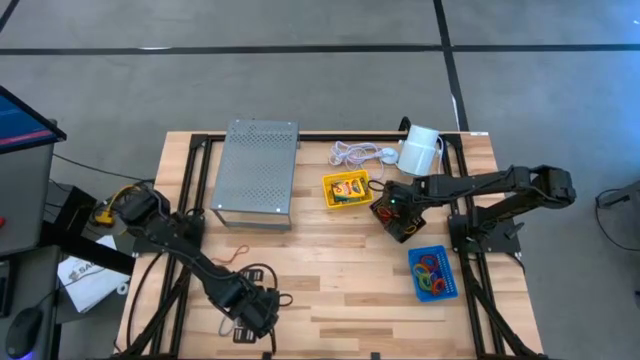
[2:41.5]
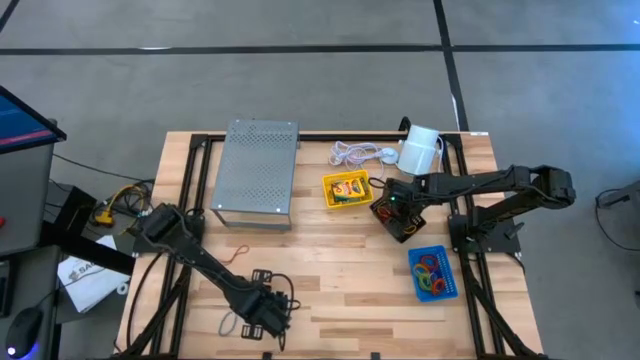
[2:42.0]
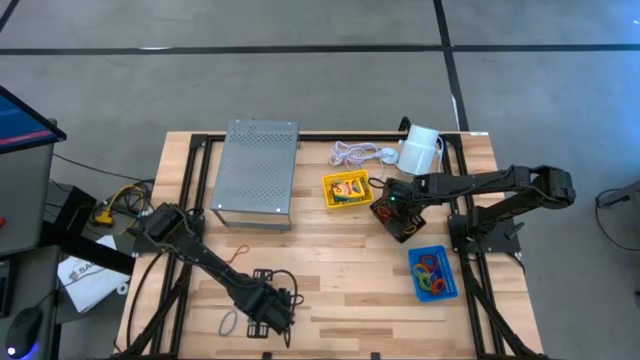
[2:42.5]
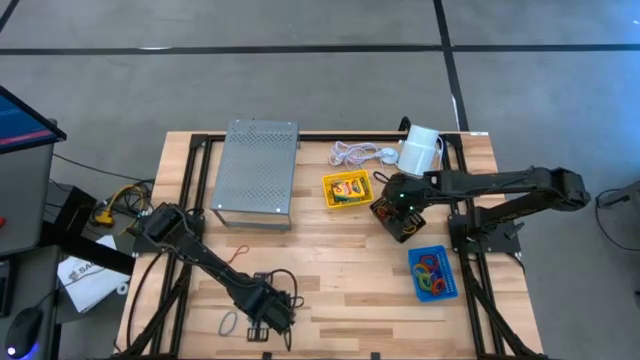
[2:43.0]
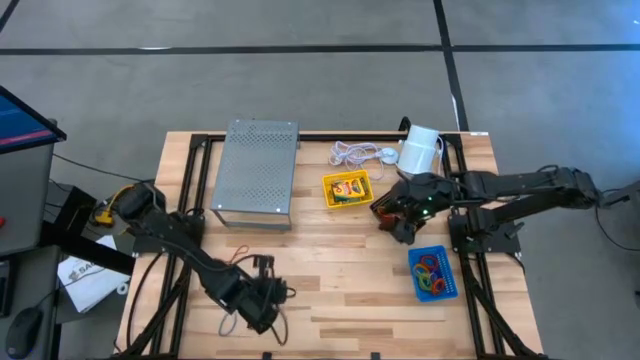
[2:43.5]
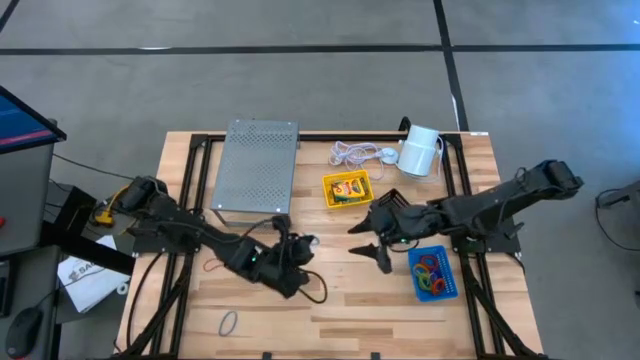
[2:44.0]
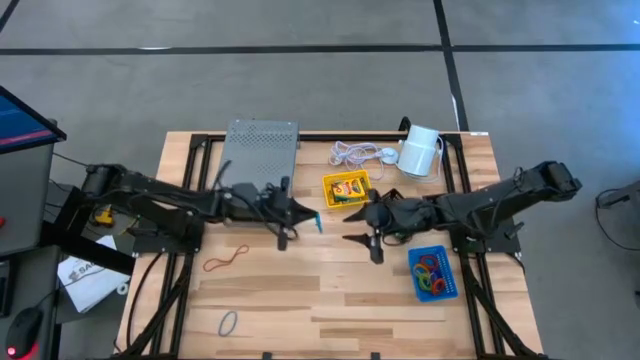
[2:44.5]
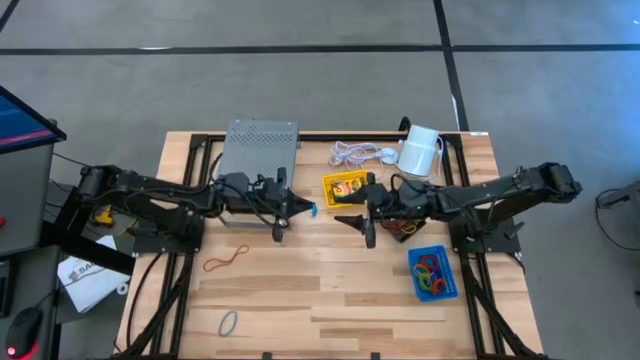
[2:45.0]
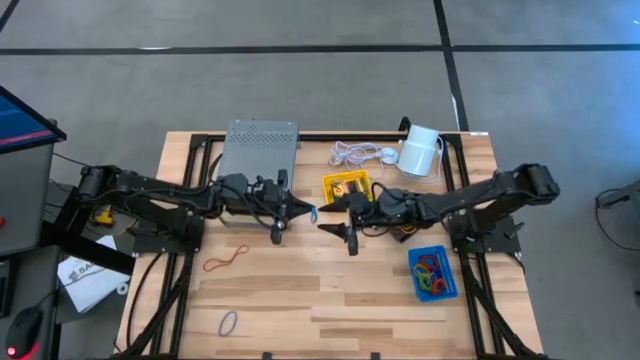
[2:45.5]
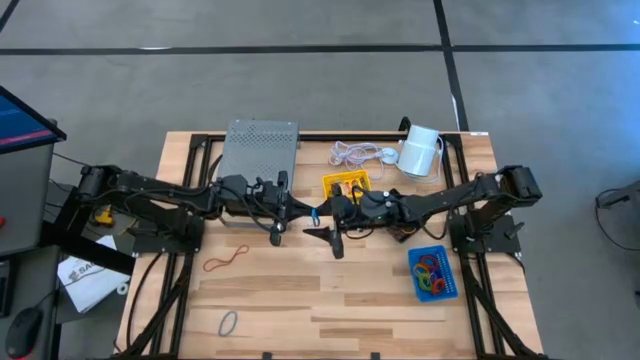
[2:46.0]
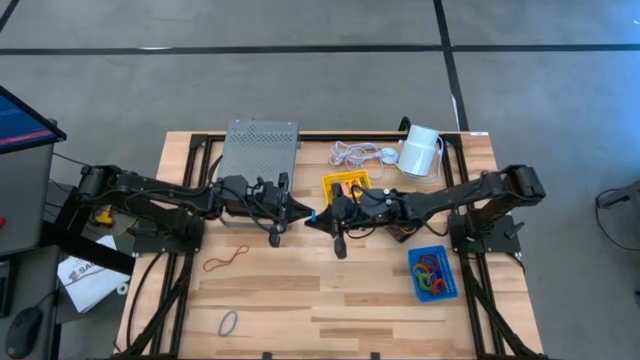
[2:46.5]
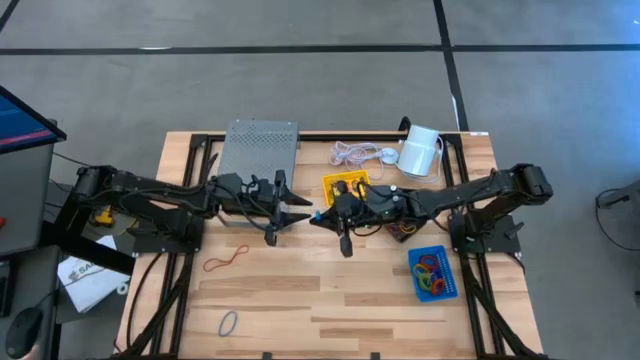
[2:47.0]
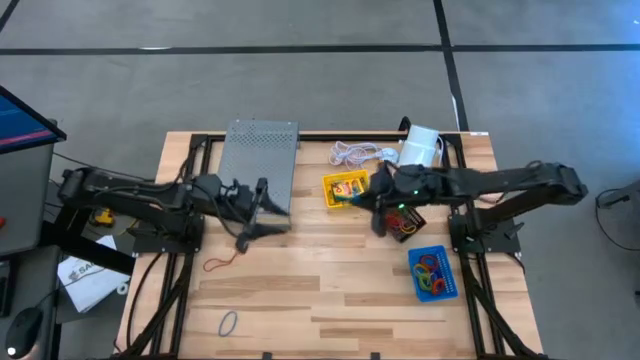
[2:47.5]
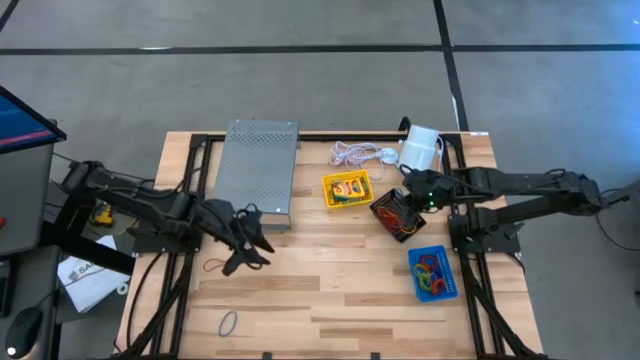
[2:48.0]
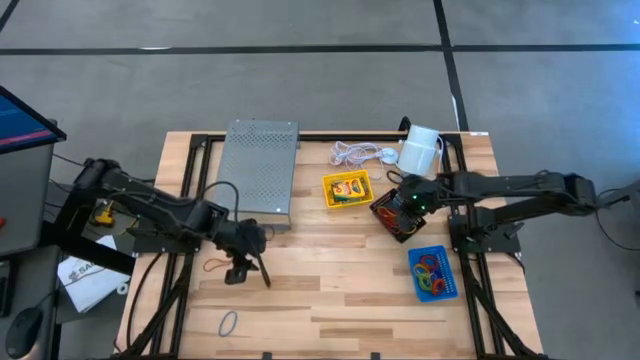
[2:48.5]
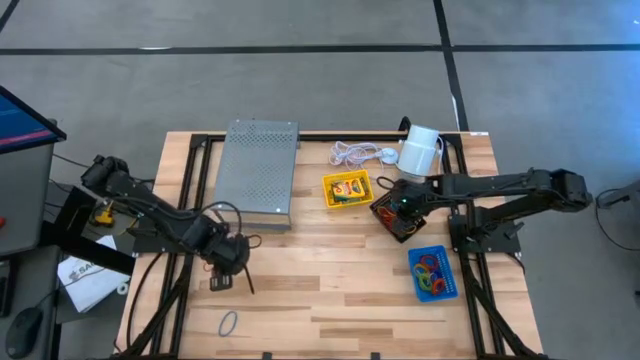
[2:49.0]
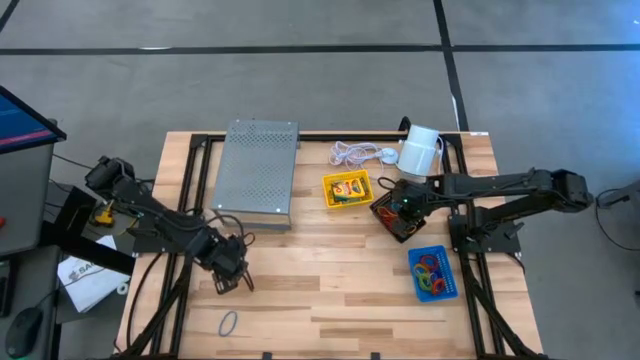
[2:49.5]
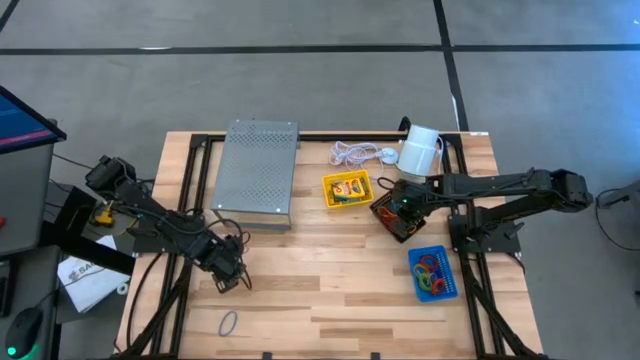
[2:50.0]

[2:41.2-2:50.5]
Task: Pick & Place Office Desk Supplies
Put the blue rubber band into the black bin

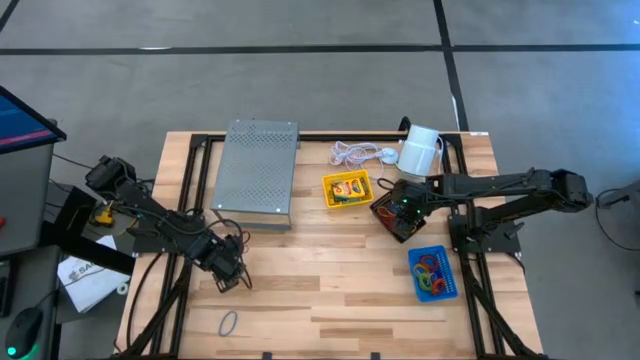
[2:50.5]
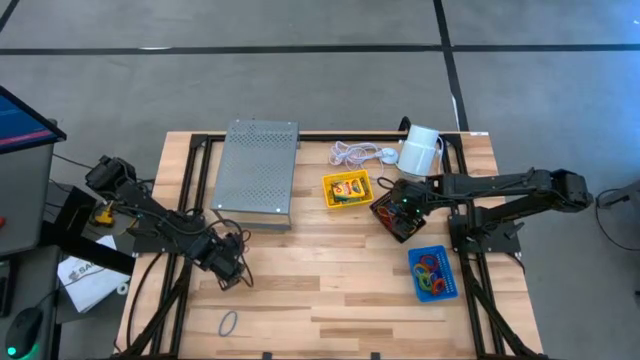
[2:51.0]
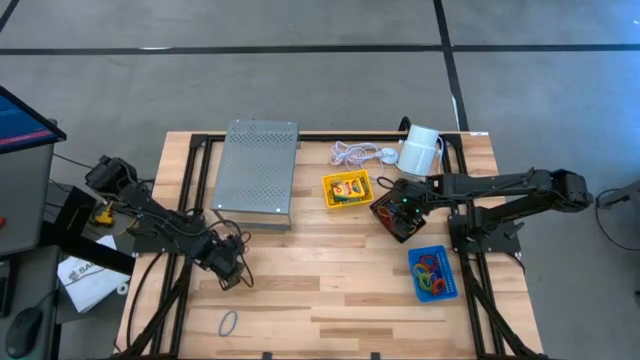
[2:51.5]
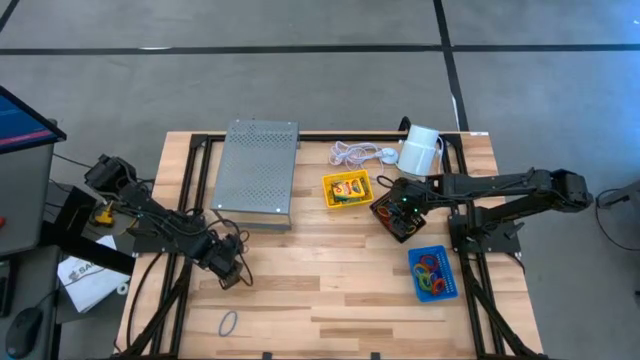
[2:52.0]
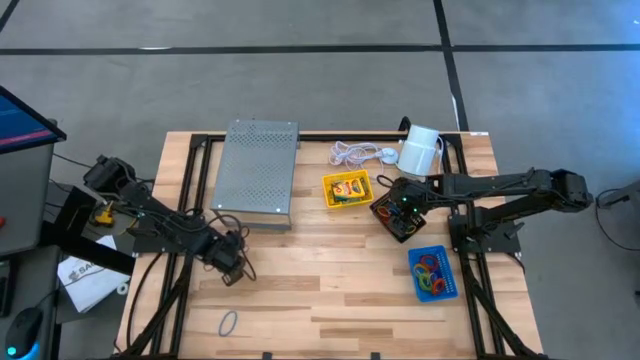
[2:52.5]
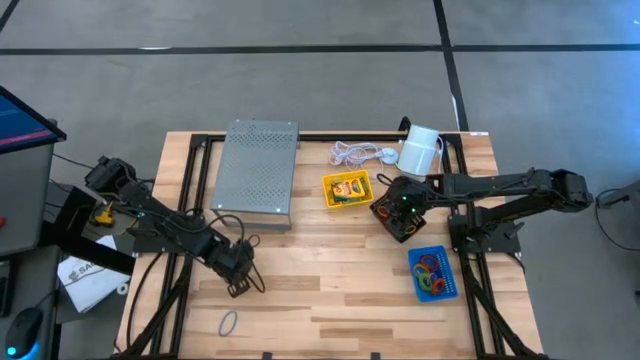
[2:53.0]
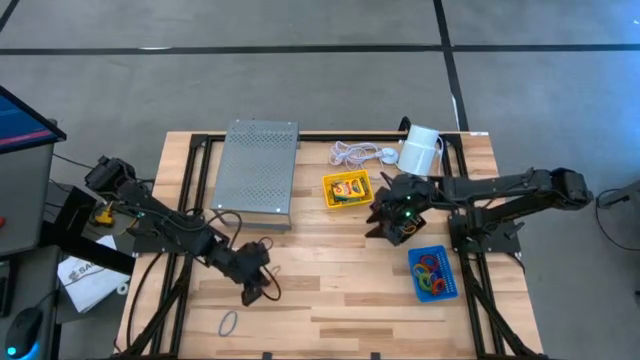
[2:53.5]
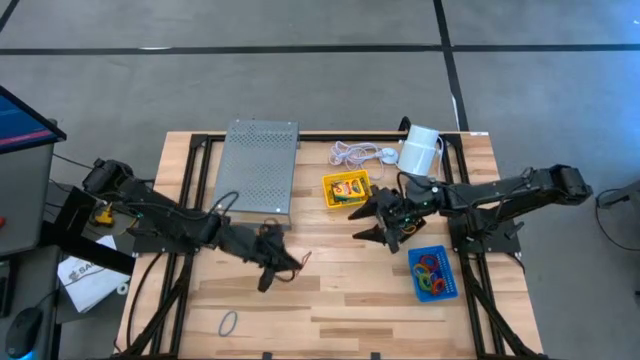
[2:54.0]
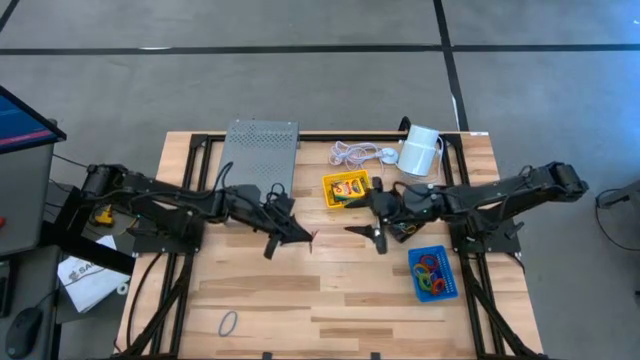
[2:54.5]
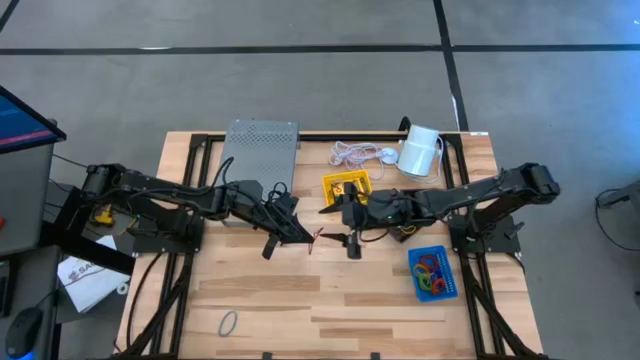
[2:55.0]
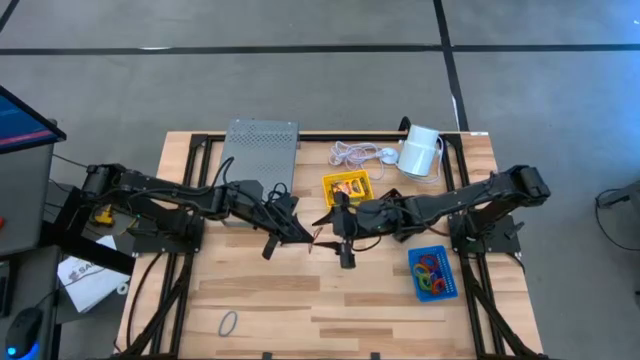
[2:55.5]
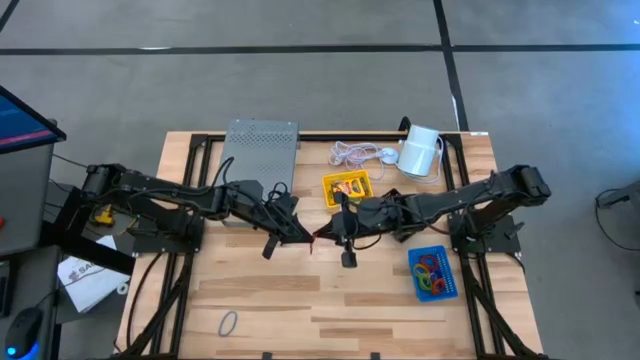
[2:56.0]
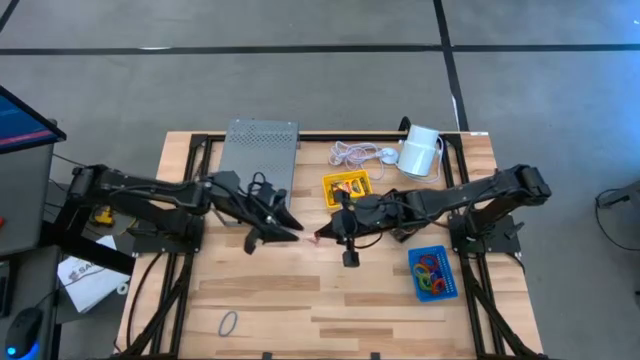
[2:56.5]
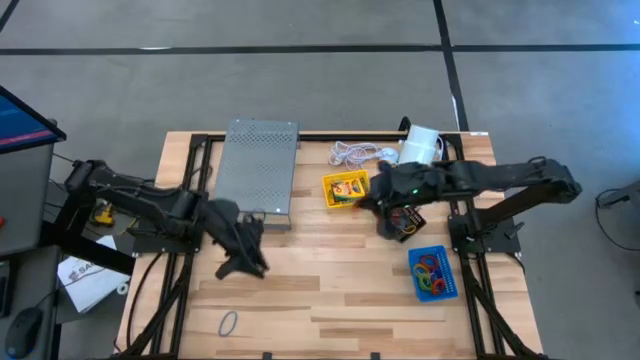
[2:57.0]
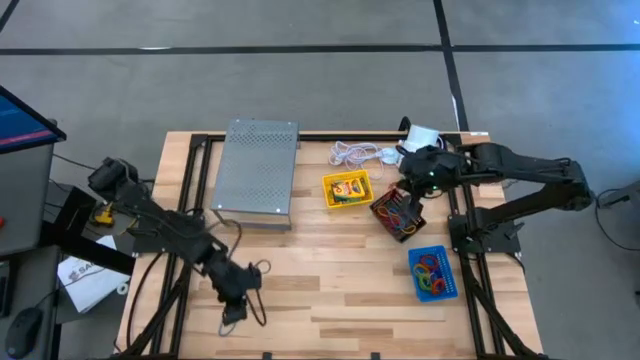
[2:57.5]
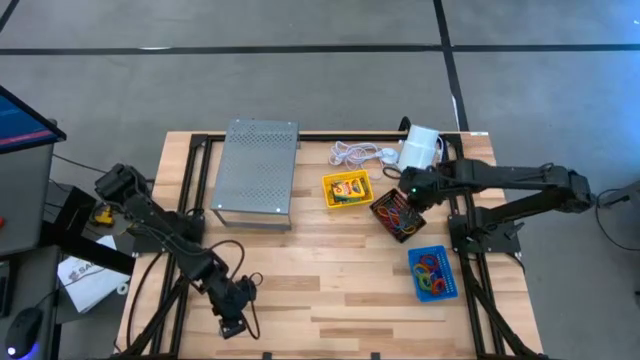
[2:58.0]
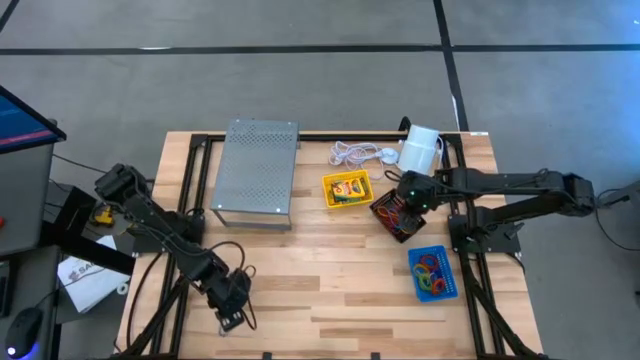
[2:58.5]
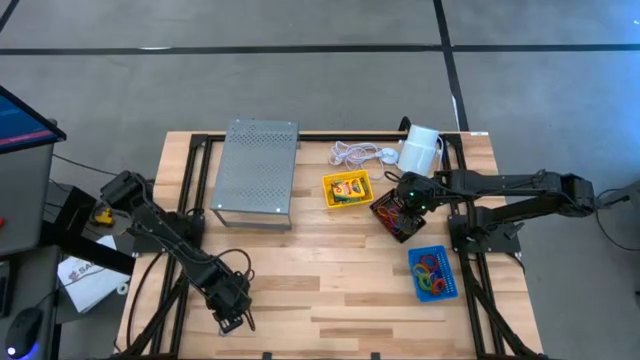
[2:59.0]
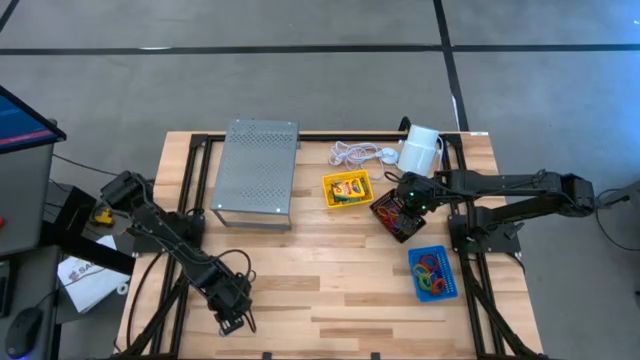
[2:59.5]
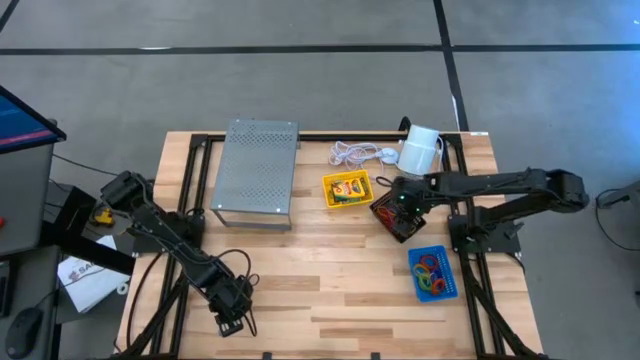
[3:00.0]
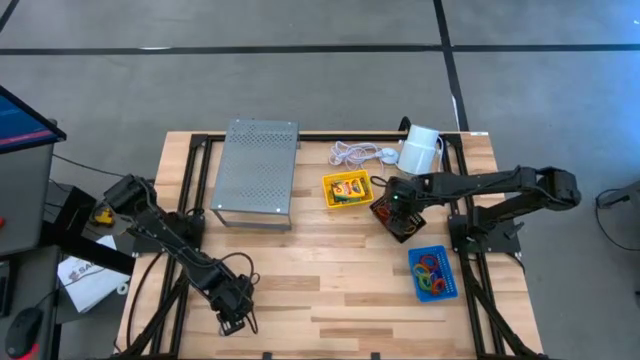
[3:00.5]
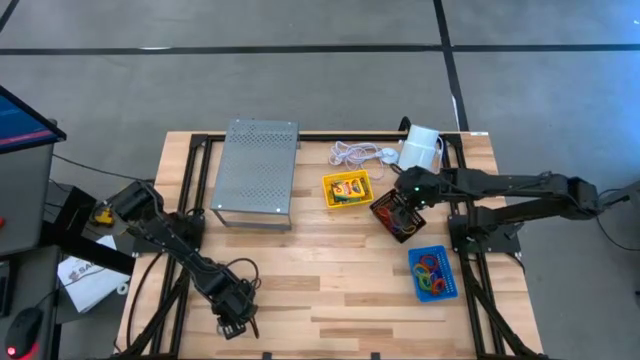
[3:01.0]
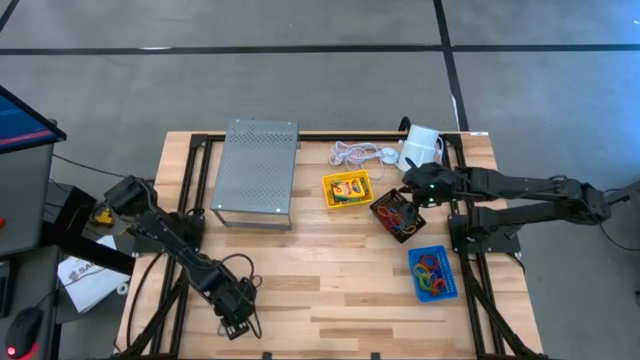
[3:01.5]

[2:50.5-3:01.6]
Put the red rubber band into the black bin

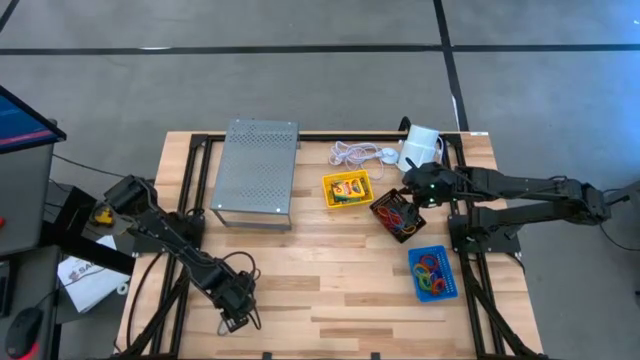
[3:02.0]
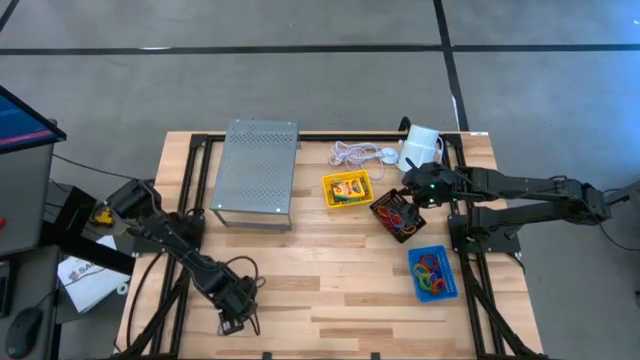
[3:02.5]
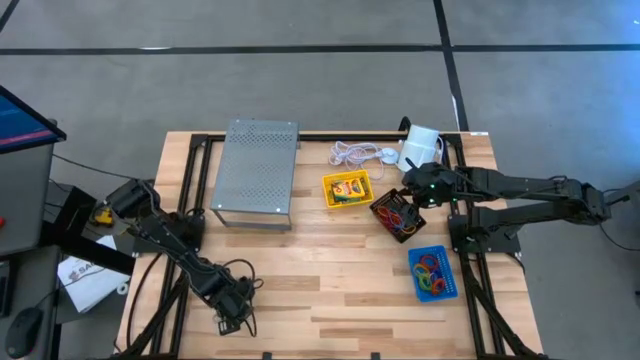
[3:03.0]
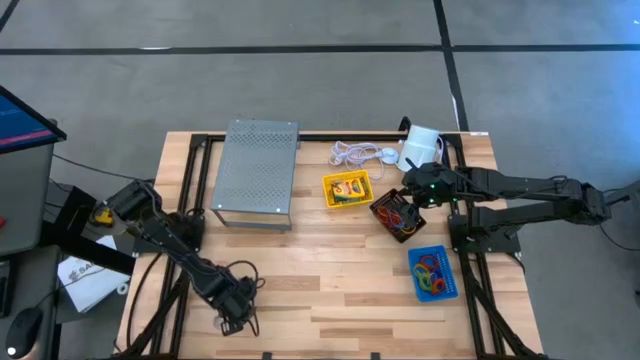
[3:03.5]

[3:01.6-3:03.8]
Put the blue rubber band into the black bin
